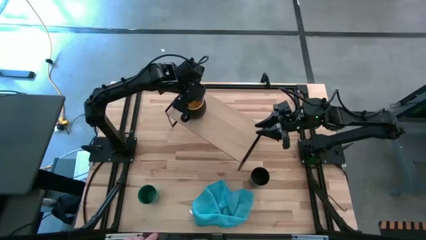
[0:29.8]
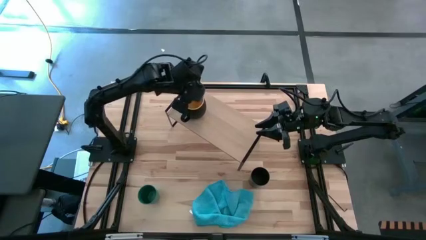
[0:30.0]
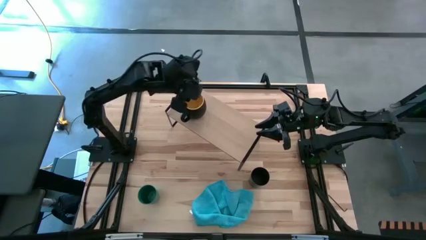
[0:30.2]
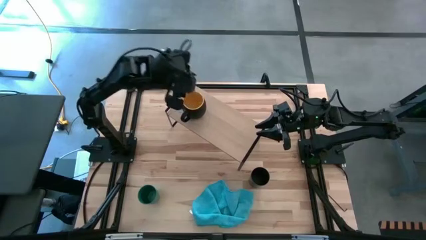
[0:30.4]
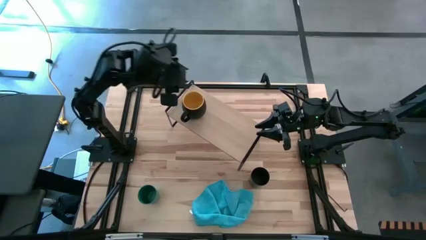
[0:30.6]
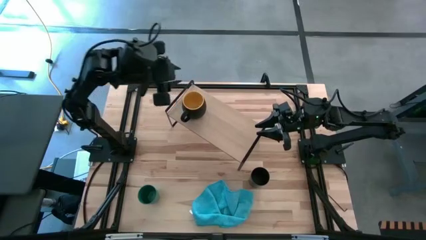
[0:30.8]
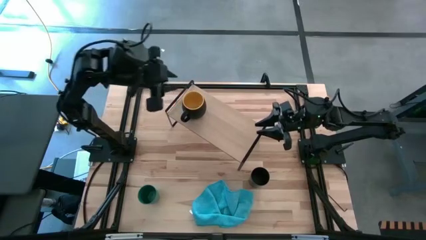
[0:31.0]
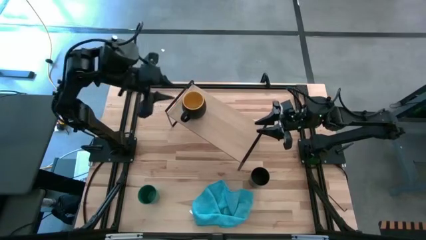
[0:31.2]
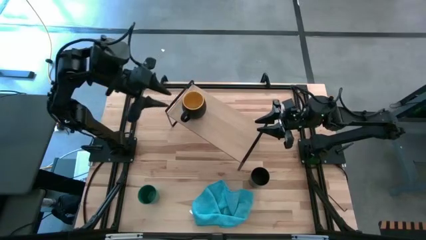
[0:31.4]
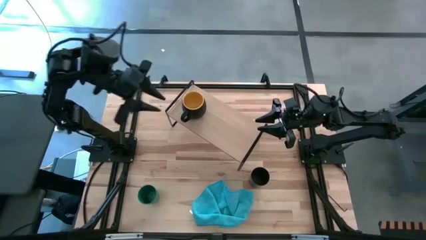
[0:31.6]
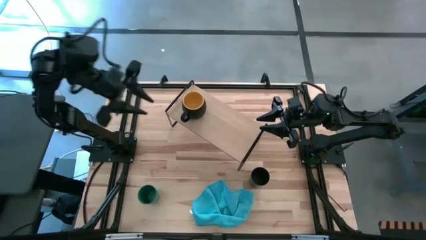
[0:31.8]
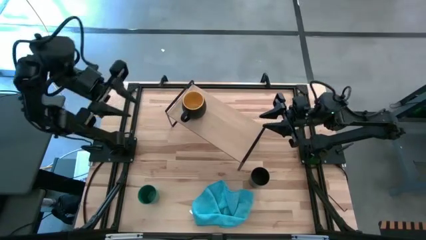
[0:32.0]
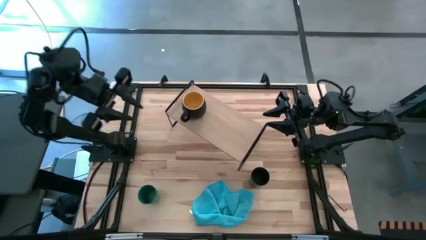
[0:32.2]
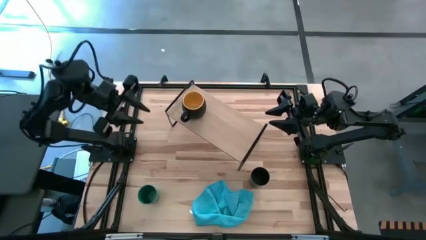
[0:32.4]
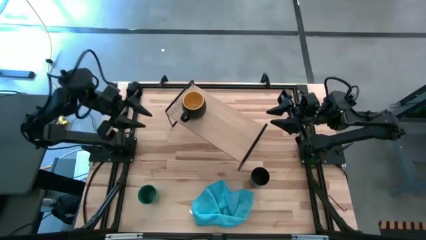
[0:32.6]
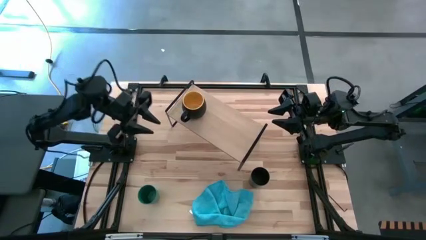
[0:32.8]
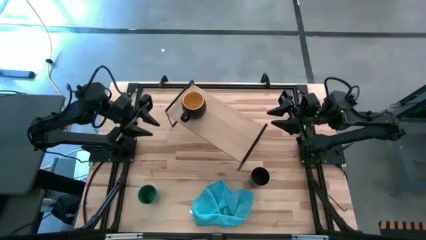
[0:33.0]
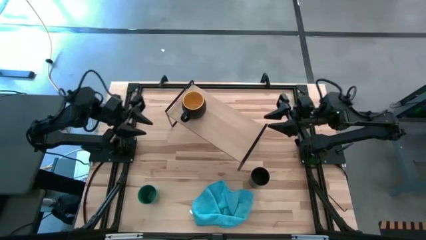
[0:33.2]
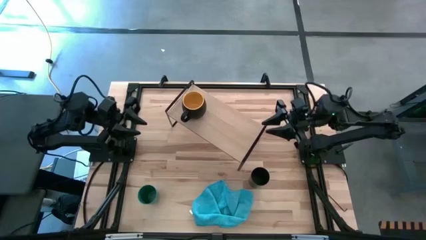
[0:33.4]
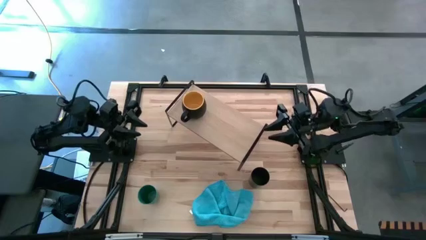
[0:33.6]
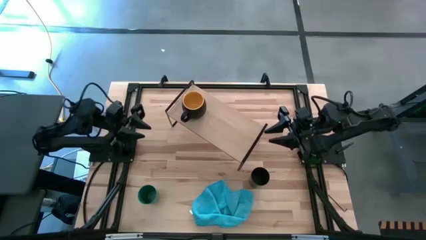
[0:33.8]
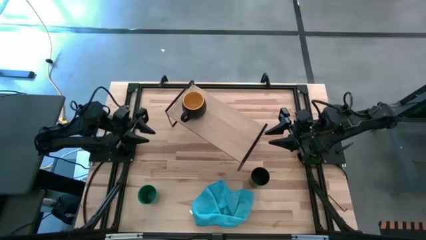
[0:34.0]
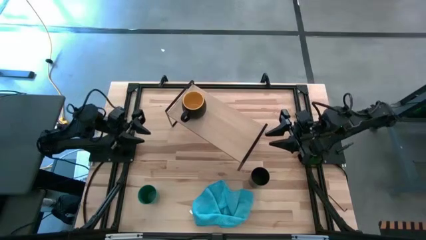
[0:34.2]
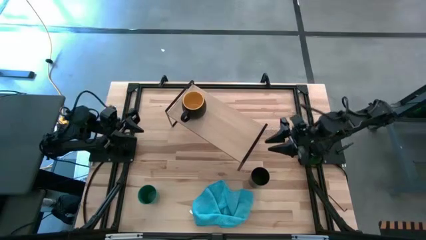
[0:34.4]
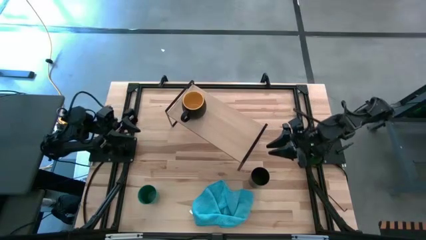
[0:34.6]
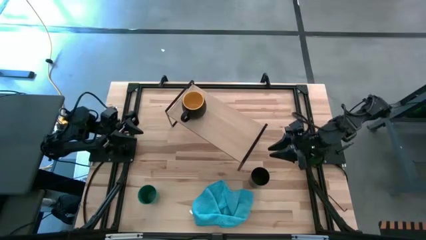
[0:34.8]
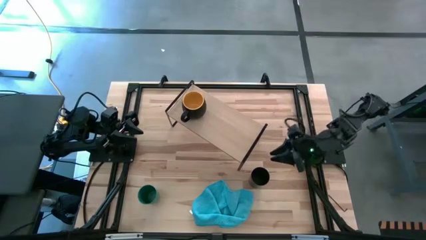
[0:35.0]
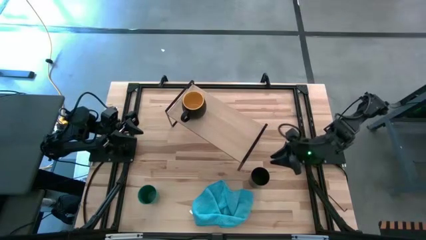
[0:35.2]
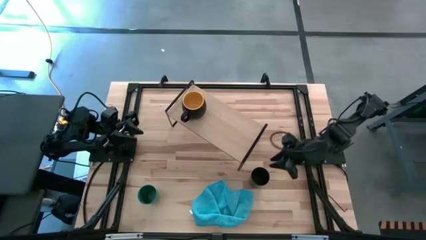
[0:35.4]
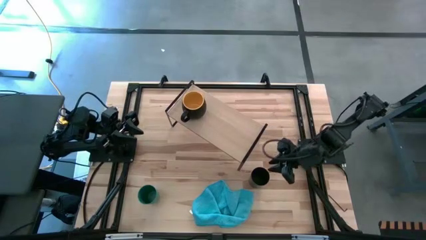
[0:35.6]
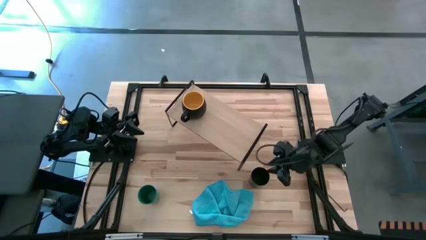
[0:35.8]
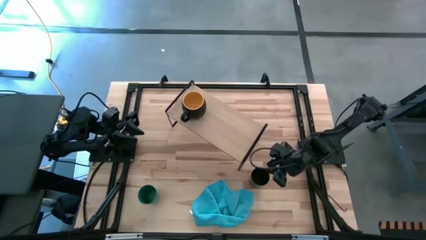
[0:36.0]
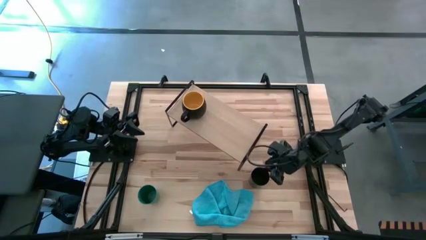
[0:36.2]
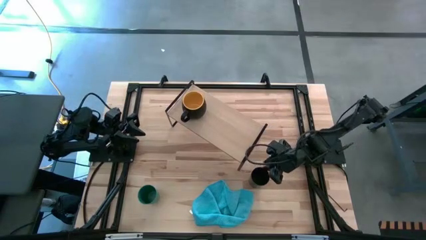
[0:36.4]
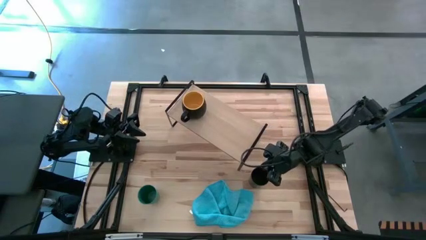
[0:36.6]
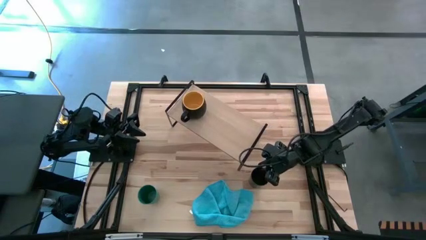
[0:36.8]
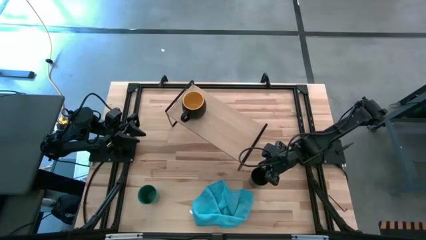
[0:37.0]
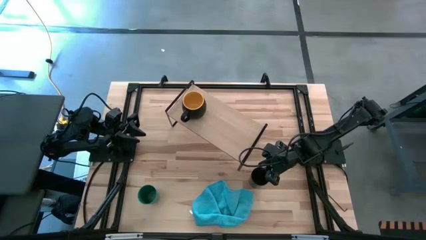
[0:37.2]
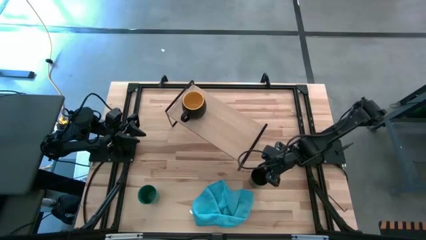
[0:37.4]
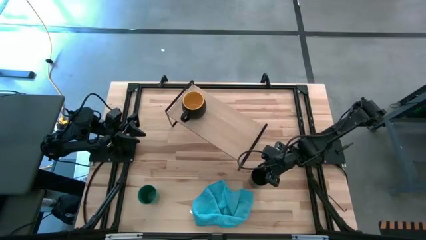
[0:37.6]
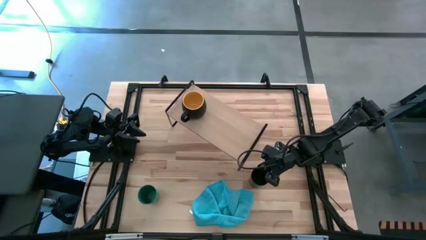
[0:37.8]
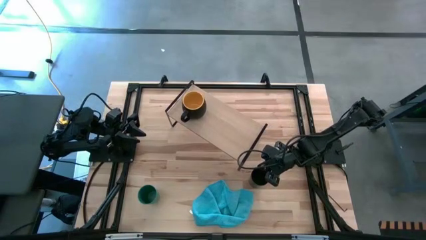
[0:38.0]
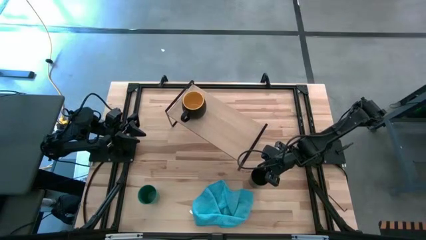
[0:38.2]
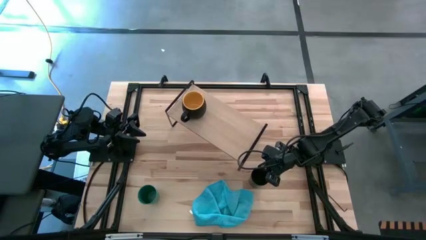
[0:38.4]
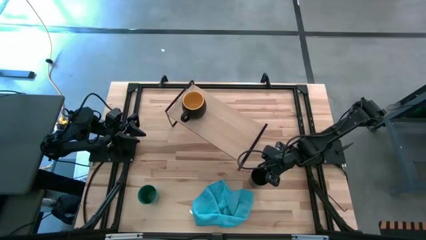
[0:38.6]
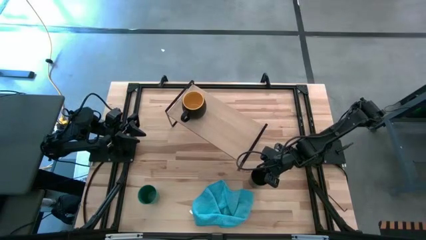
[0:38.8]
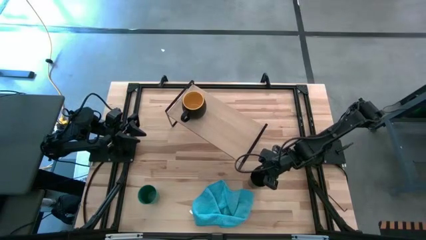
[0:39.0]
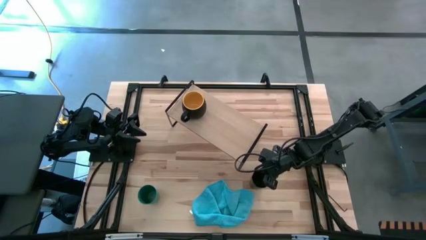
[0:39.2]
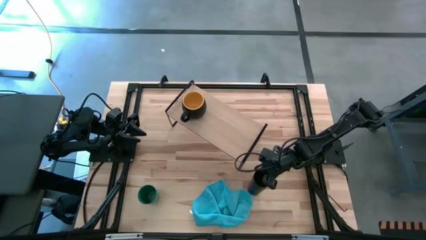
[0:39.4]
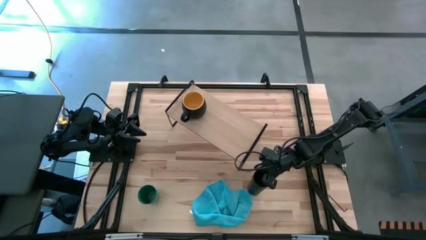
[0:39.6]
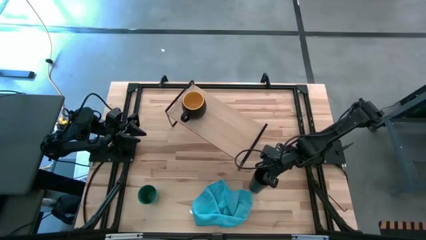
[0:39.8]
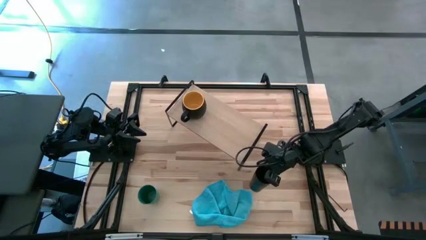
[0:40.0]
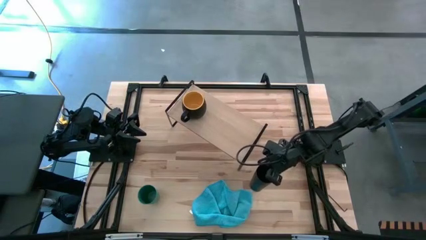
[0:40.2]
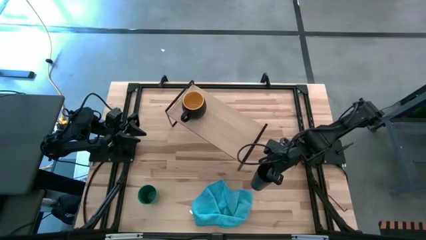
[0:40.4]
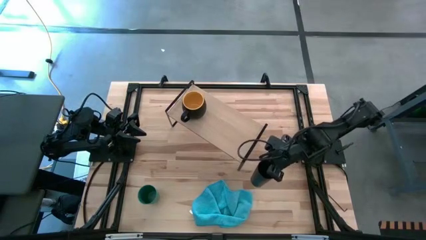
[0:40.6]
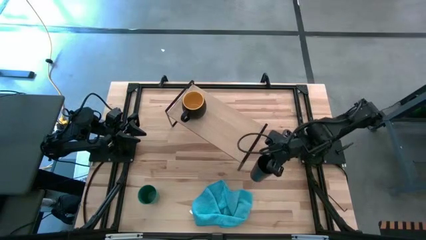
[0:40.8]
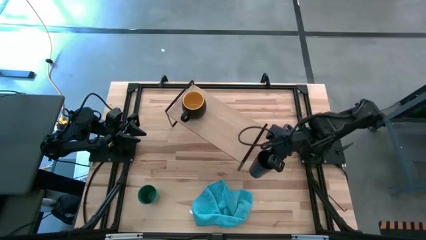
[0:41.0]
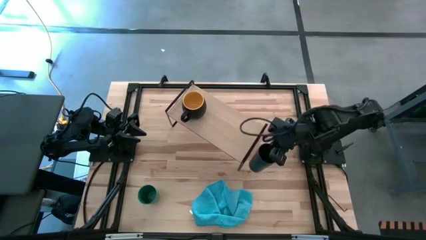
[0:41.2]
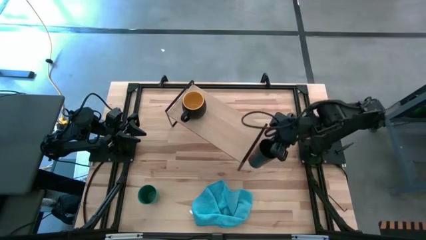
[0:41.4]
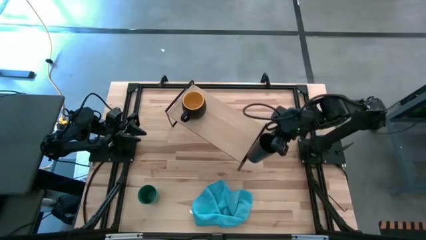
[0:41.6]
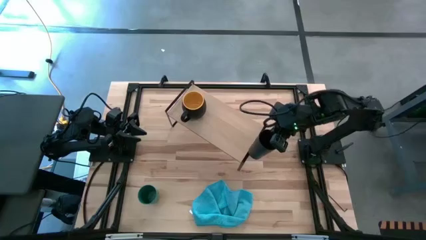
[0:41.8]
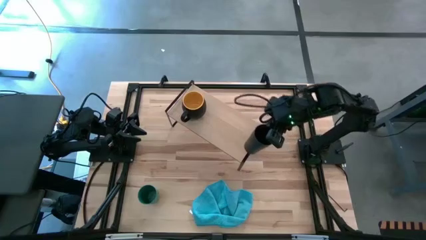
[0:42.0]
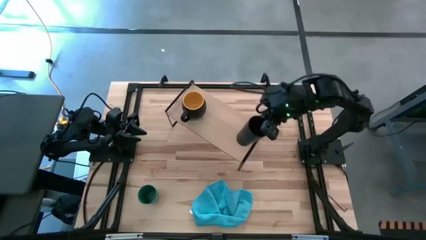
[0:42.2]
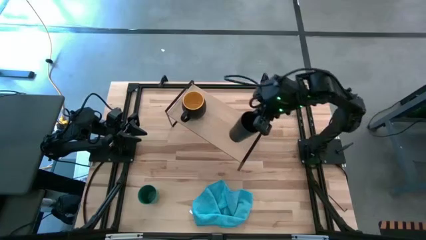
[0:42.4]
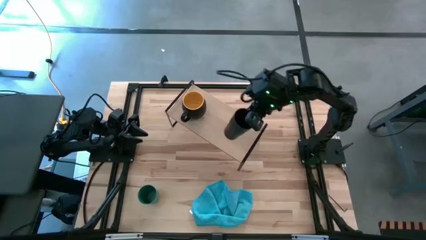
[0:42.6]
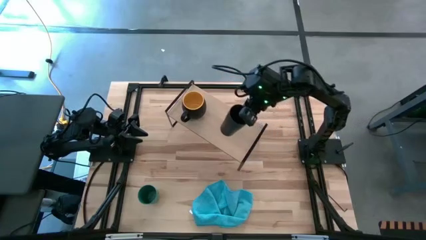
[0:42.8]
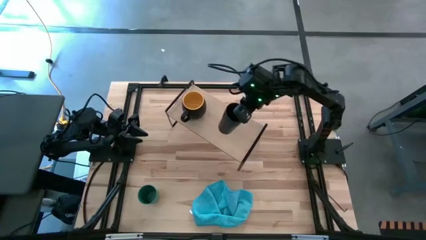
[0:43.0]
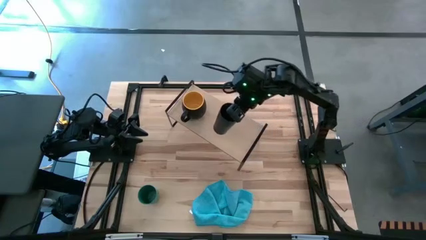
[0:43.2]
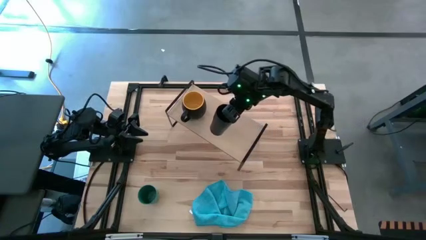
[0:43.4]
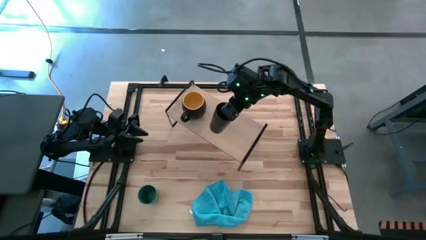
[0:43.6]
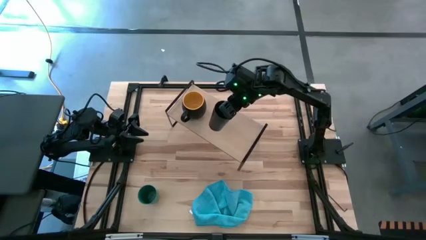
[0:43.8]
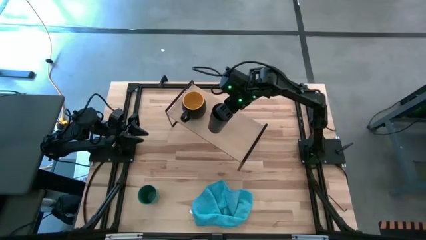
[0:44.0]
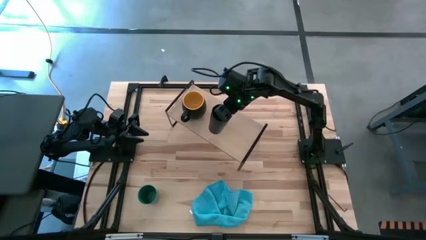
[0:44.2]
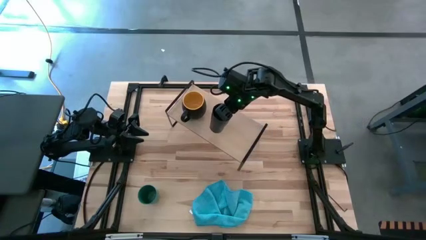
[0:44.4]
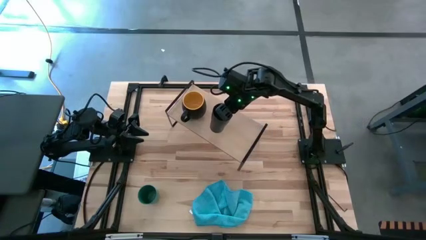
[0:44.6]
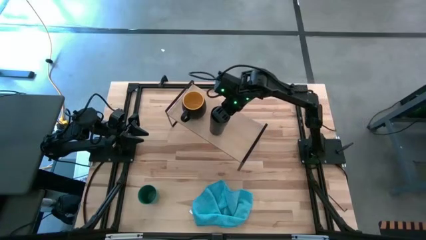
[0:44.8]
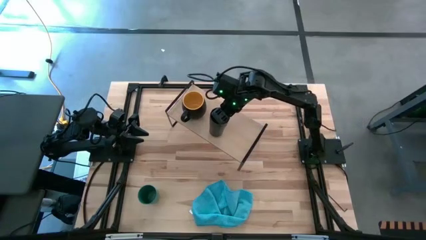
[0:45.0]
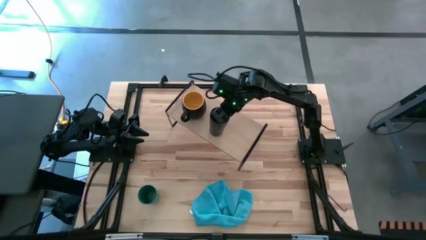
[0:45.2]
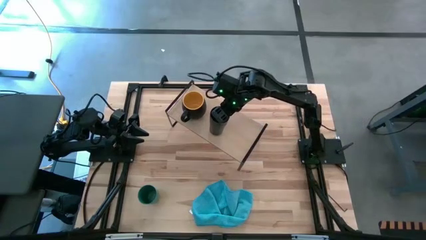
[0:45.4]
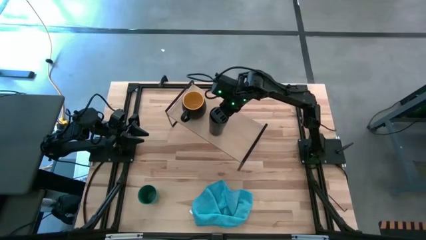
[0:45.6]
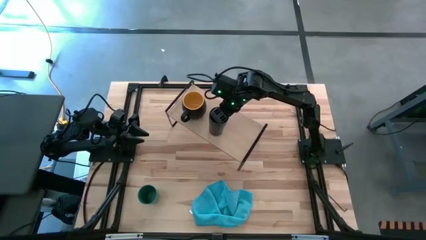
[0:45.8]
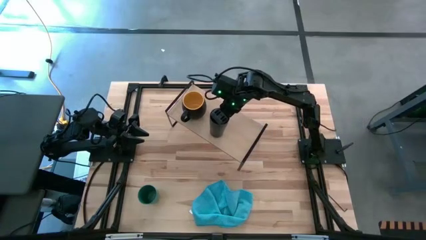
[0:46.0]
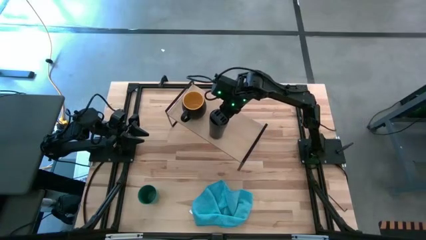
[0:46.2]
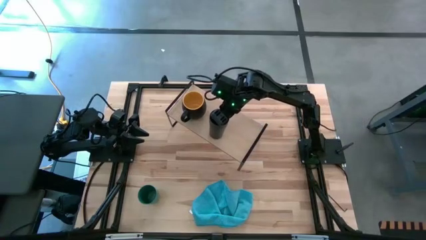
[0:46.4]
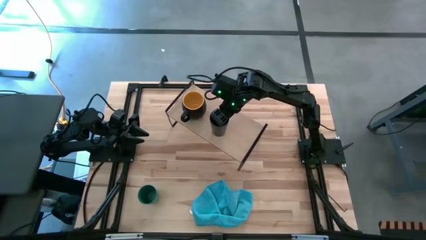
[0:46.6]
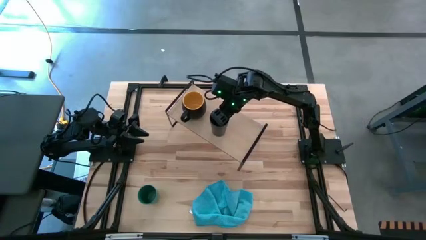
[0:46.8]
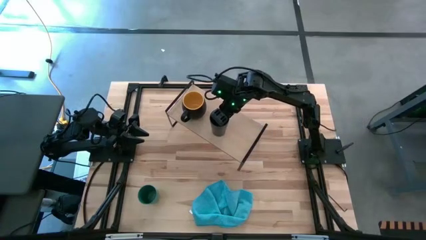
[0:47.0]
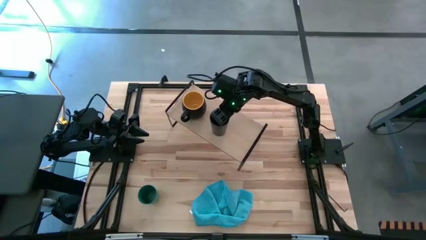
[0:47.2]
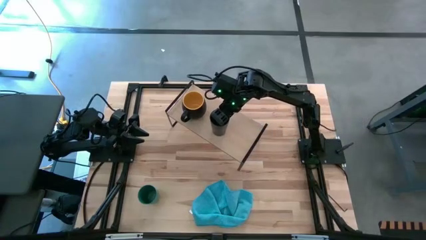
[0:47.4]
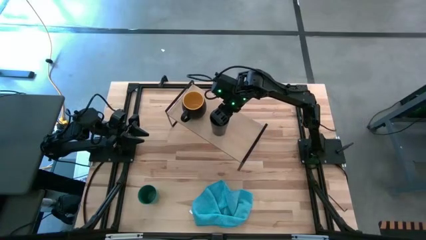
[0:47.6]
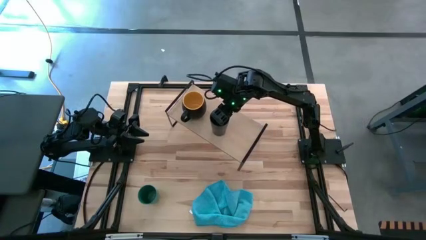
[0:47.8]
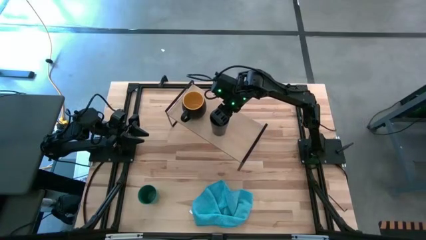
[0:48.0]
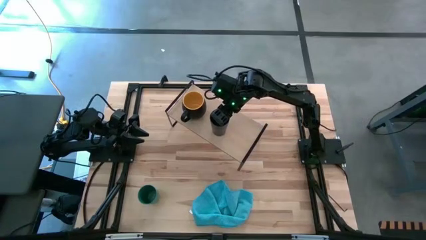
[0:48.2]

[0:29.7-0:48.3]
Task: Stack small to large cups/mugs on shelf
Put the black cup on the shelf
